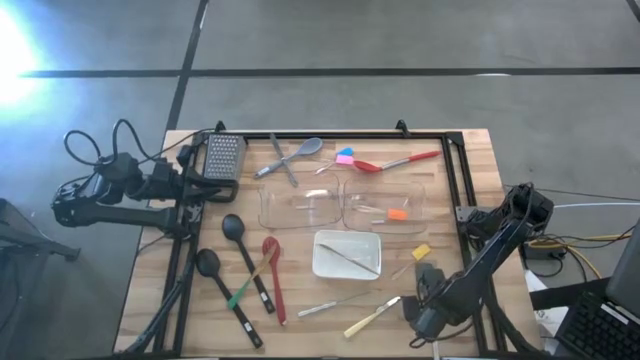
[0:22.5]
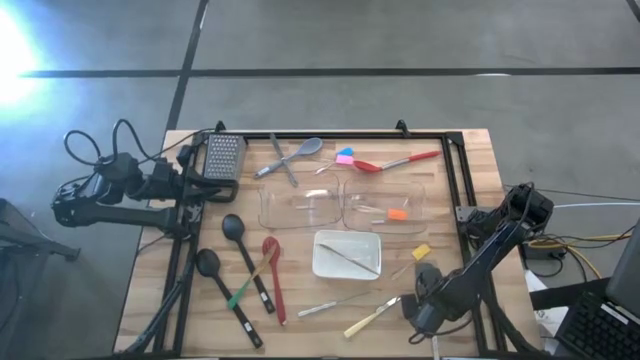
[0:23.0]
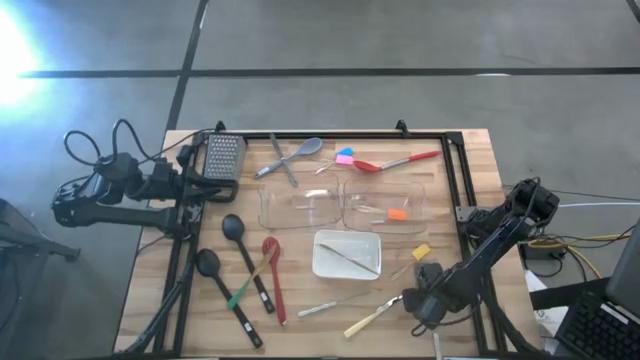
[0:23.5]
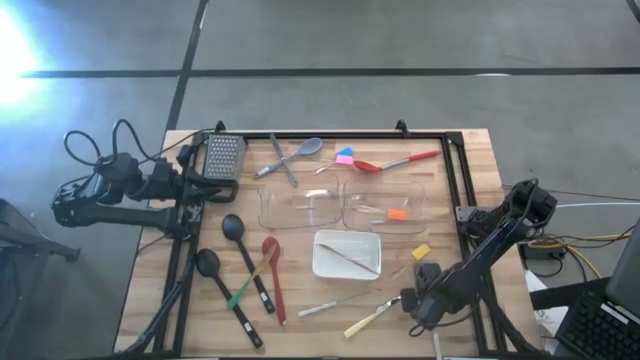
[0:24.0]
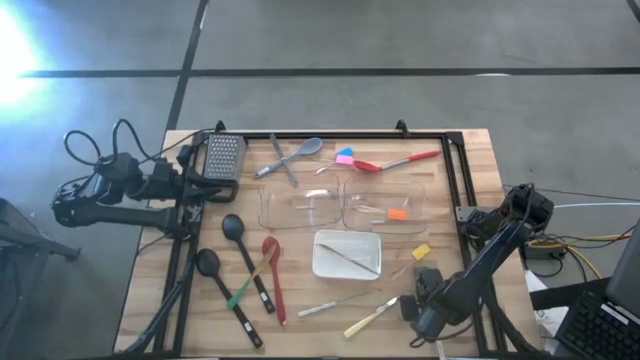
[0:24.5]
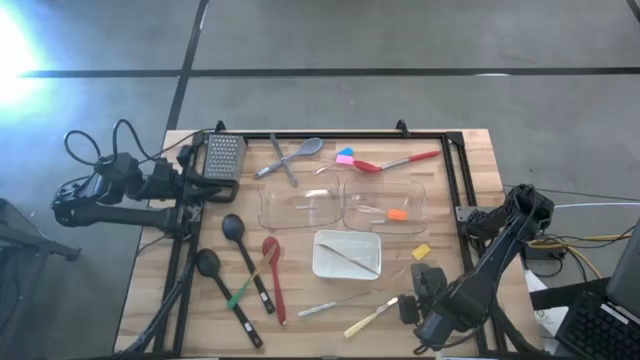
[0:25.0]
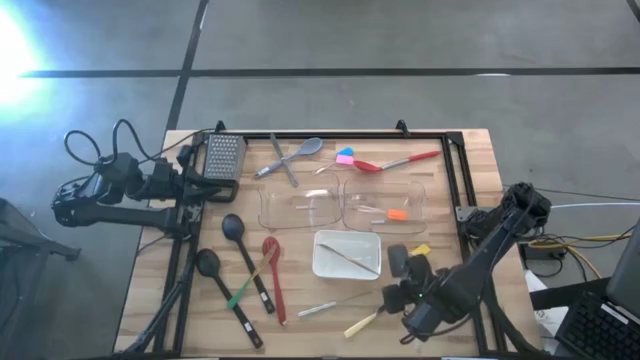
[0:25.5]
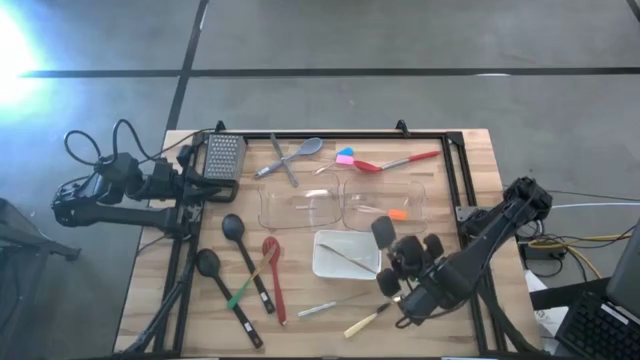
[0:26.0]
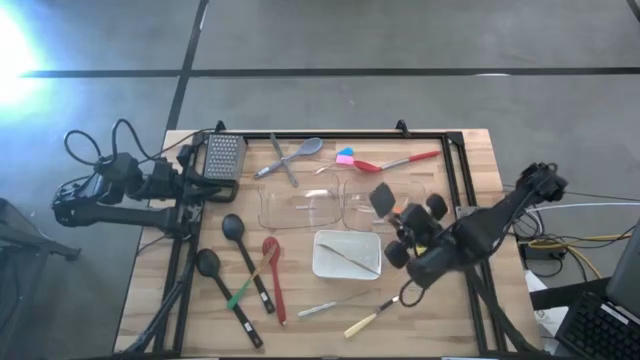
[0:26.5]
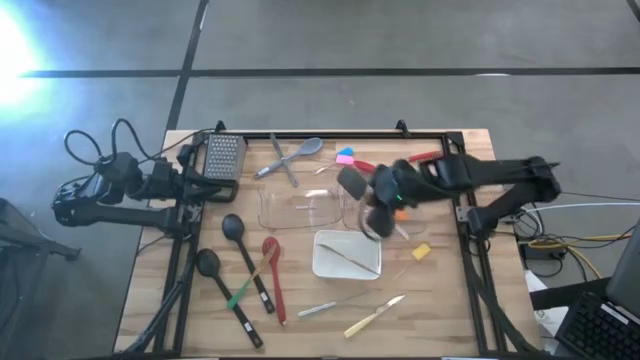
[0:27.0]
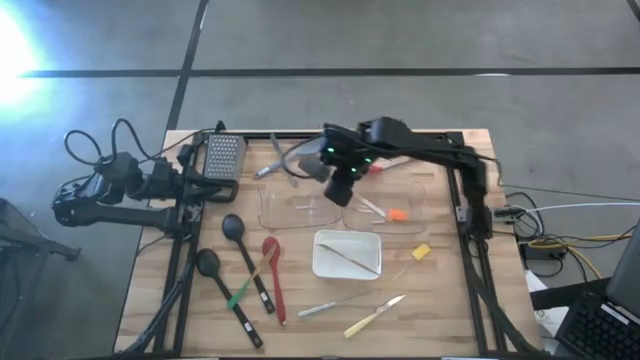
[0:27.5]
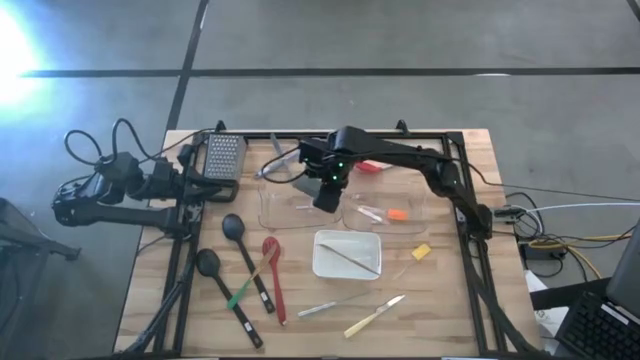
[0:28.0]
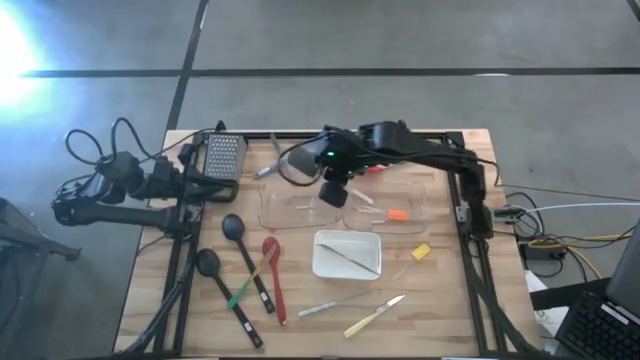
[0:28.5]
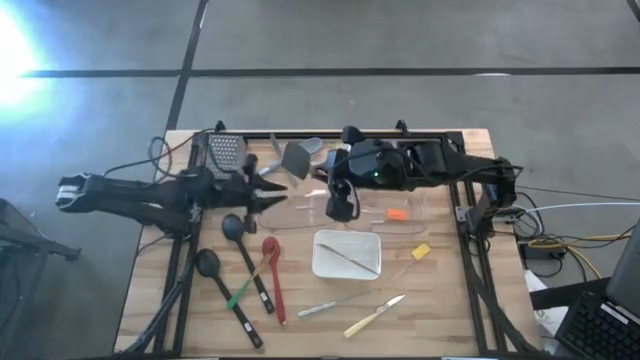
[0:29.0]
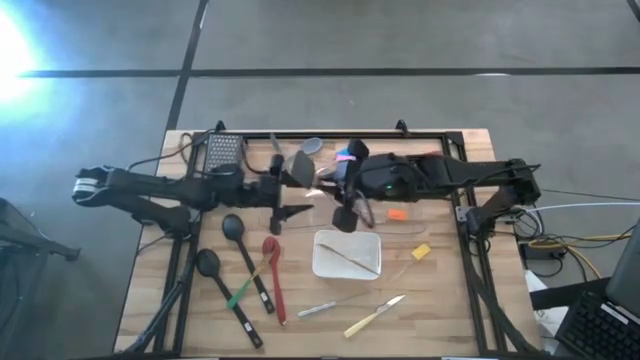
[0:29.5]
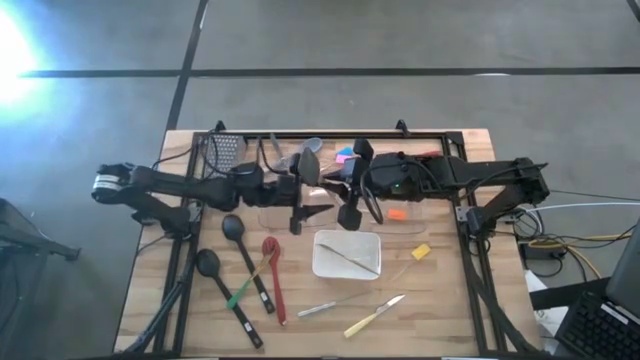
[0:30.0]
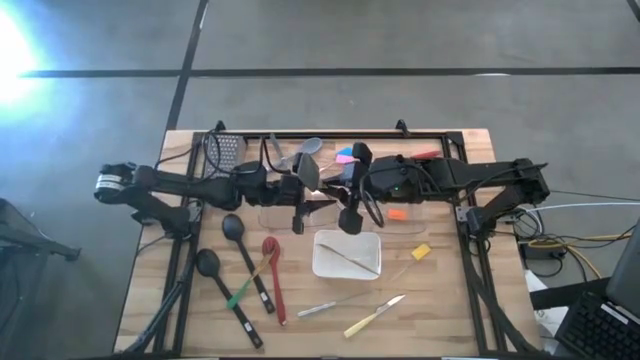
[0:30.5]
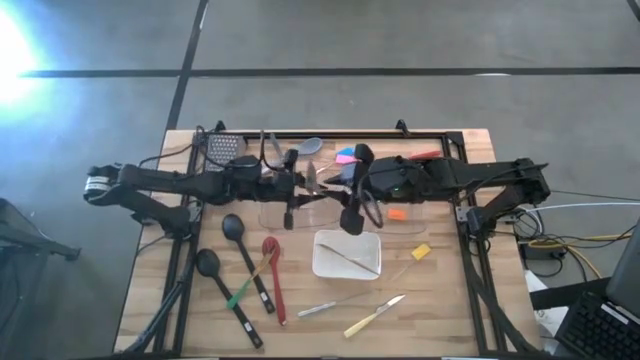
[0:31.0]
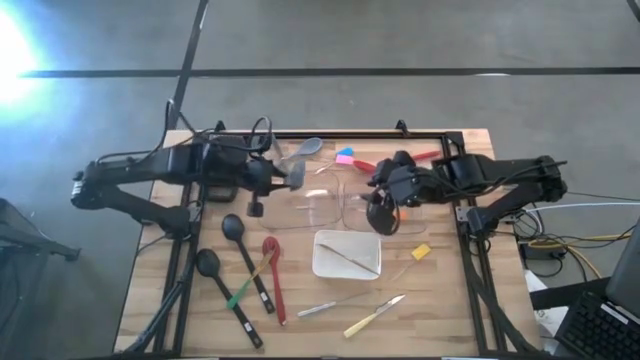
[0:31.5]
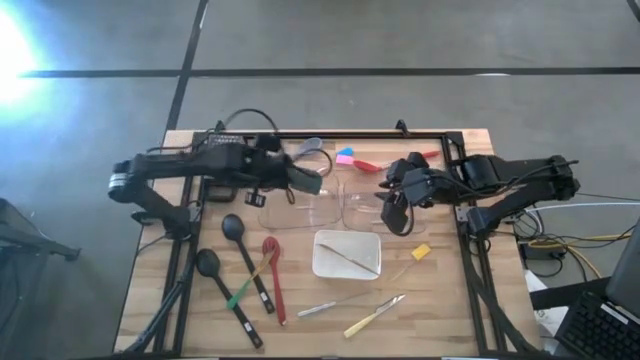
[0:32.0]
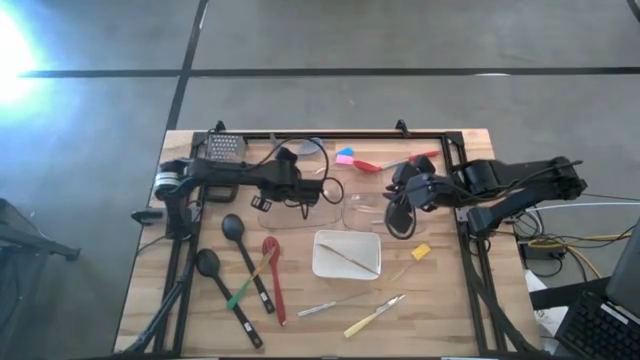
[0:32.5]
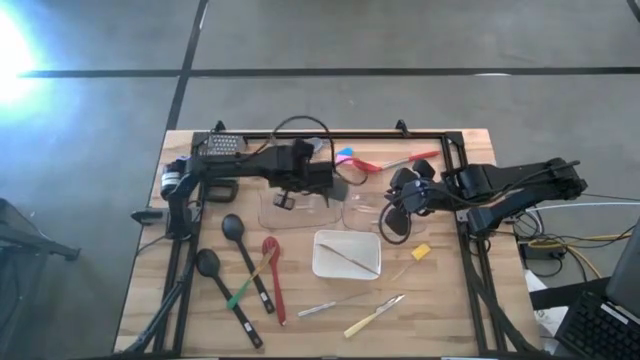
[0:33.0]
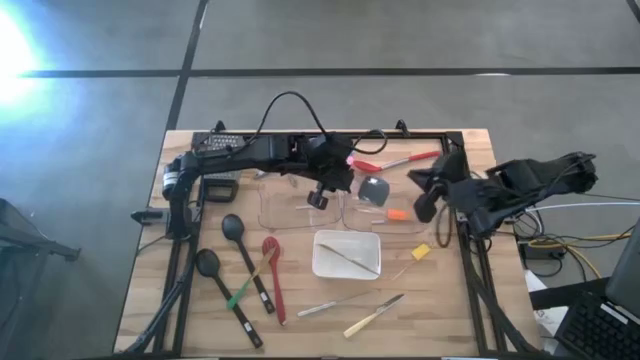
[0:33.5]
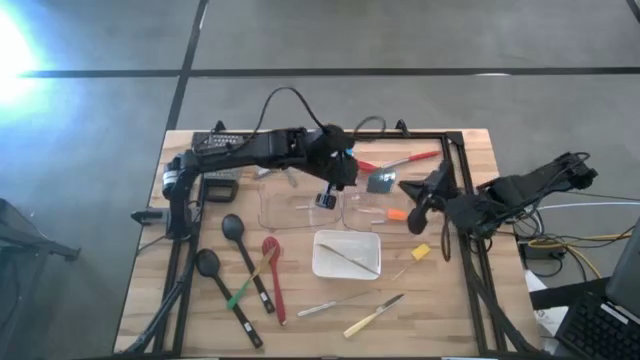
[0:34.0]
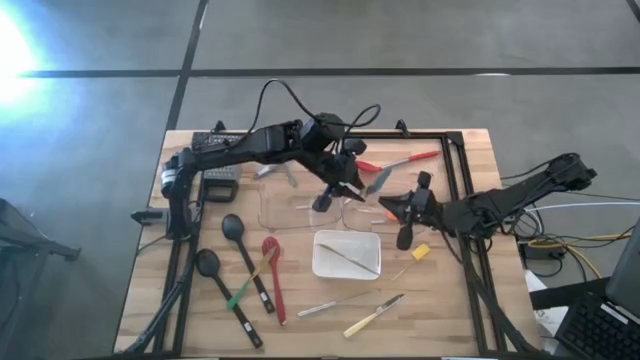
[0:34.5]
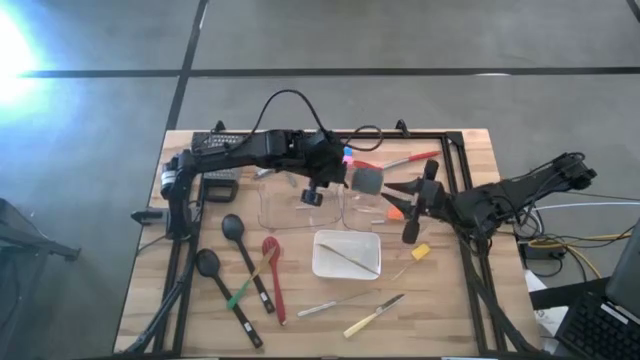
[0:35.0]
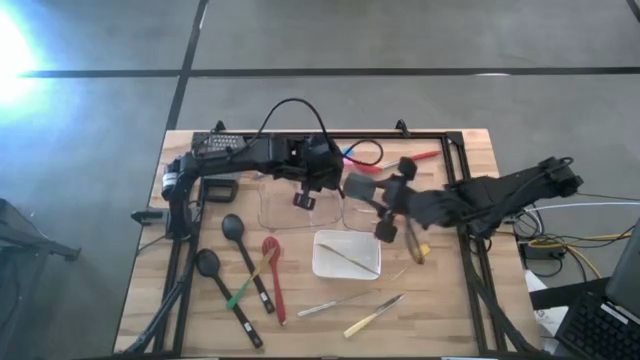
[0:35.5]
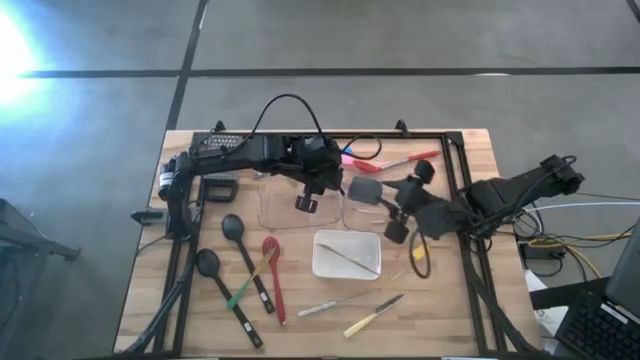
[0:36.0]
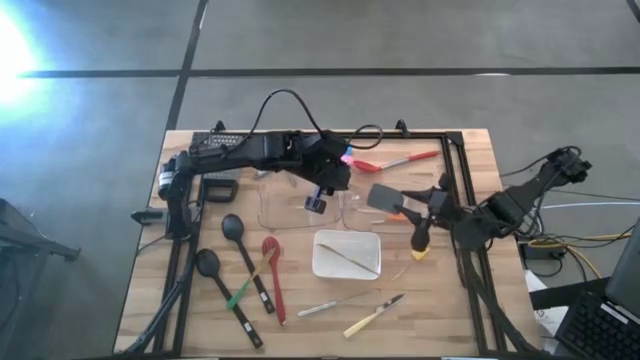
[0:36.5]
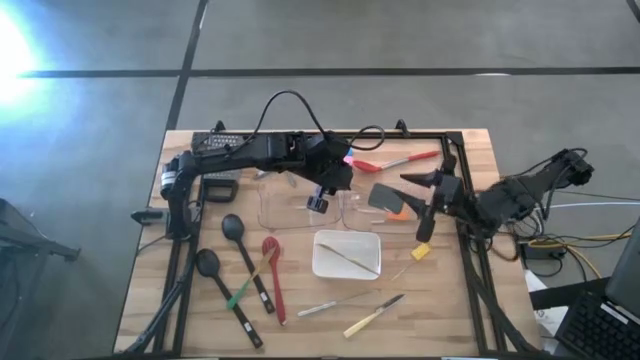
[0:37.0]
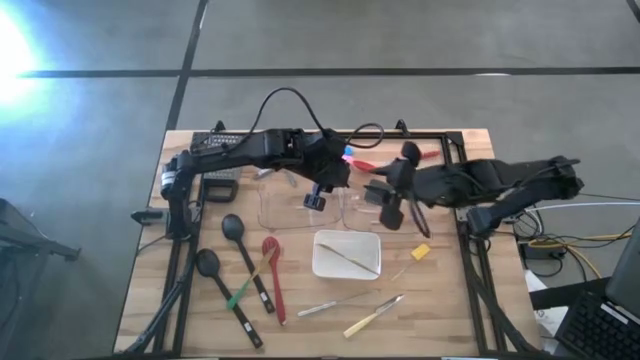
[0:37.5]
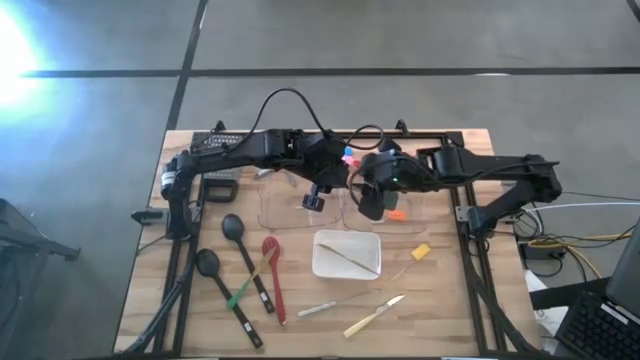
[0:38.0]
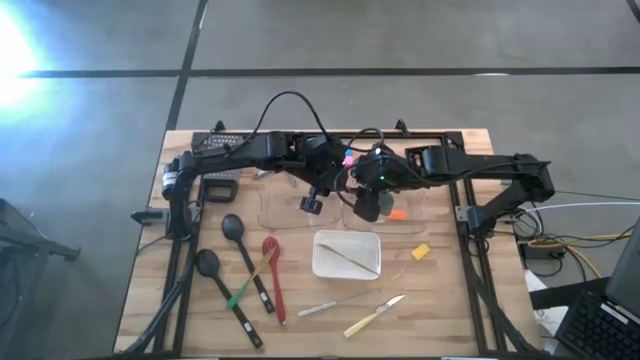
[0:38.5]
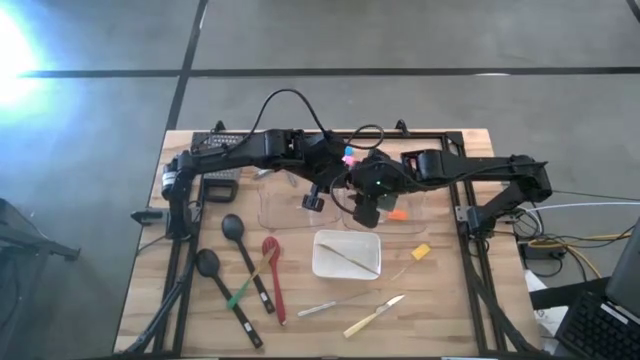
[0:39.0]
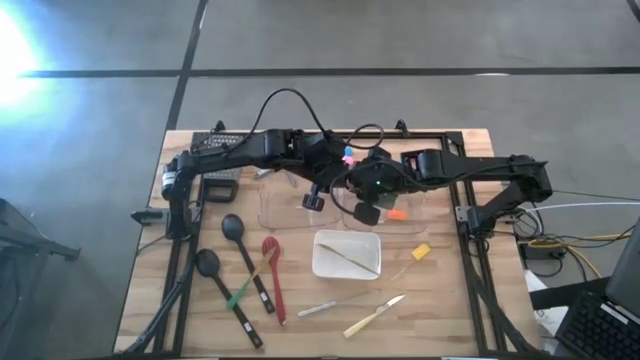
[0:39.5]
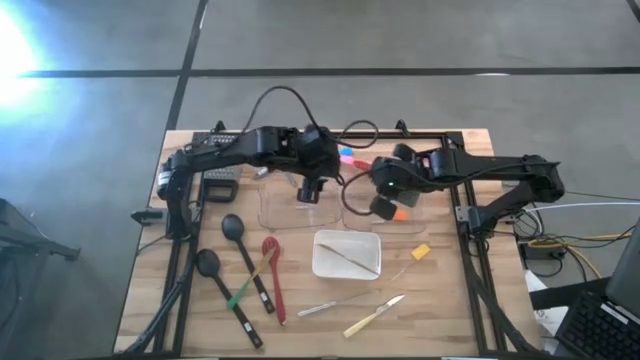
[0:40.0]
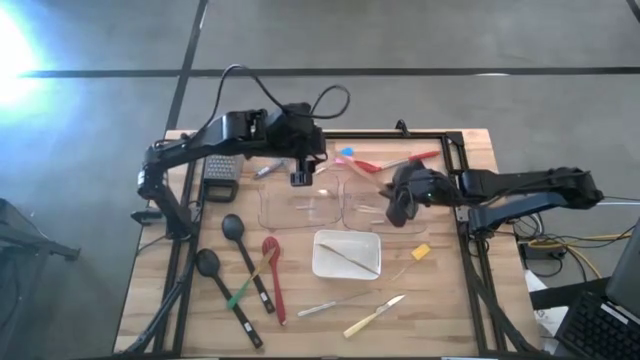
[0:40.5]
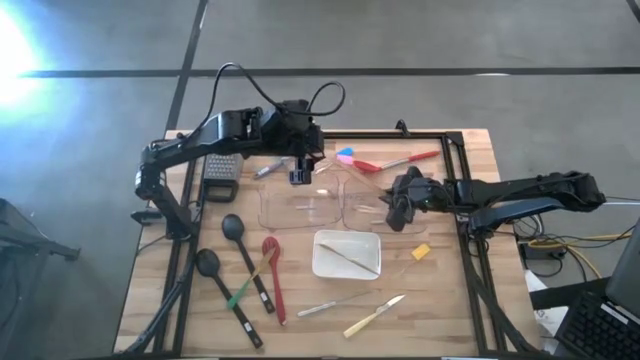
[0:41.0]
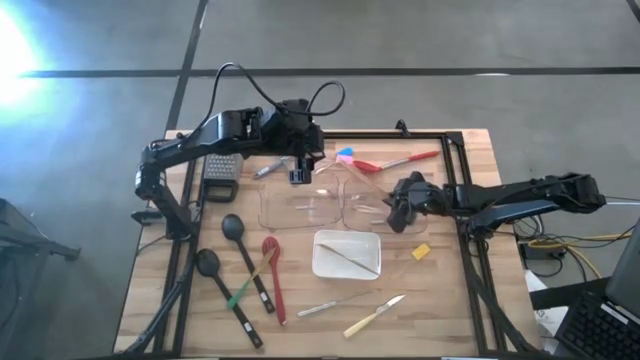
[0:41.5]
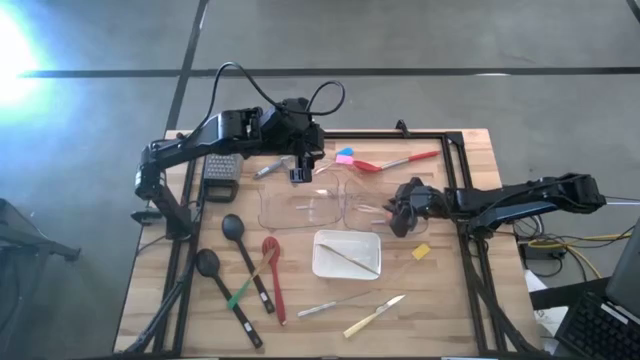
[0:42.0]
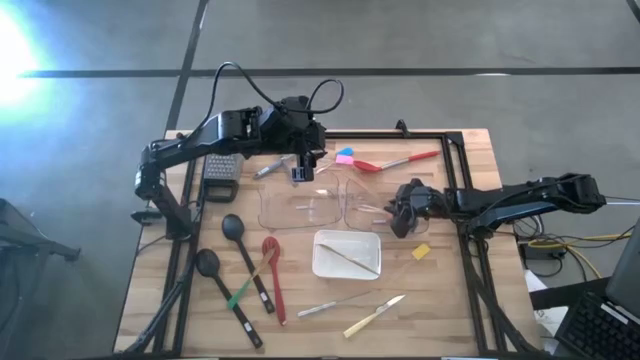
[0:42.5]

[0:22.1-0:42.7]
Task: Pick & Place Kitchen Items
Put the gray spatula into the right transparent bin

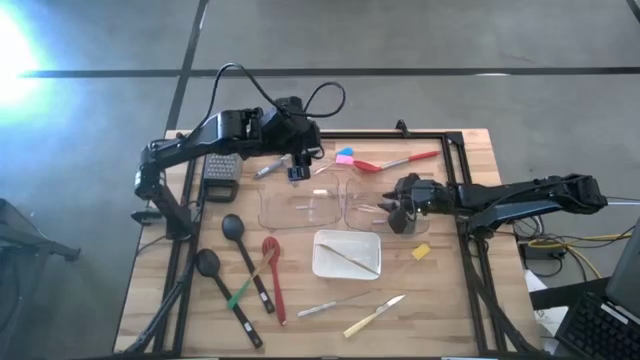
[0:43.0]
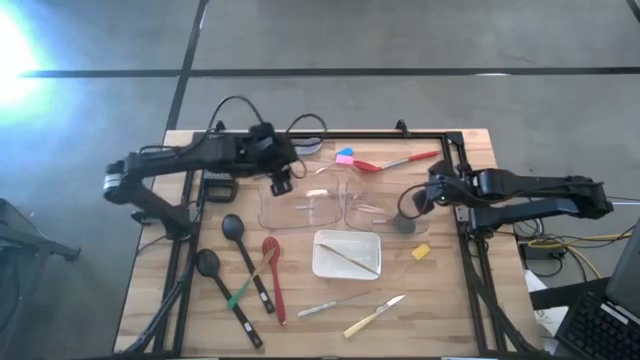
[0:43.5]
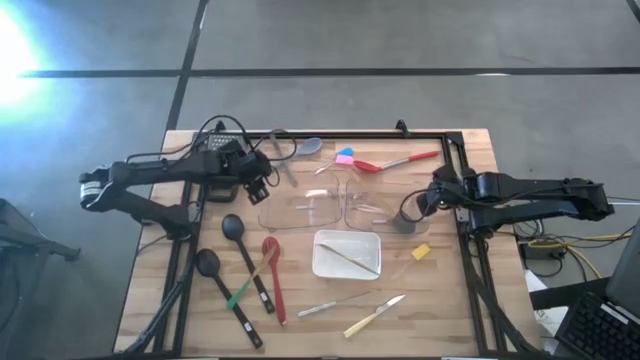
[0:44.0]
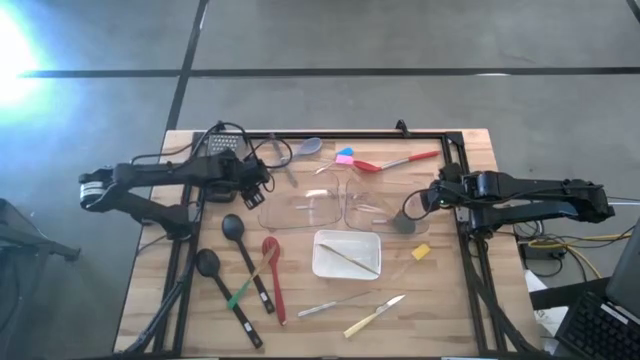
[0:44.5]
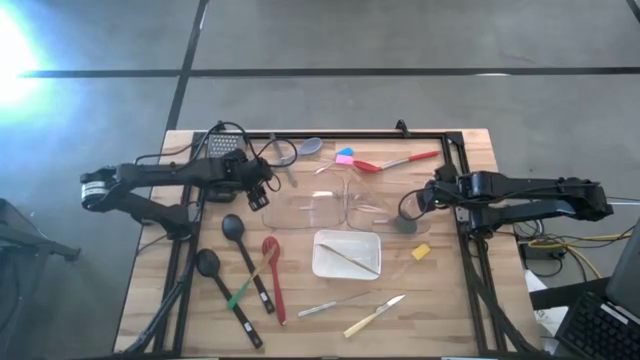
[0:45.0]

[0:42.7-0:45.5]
Adjust the right transparent bin
